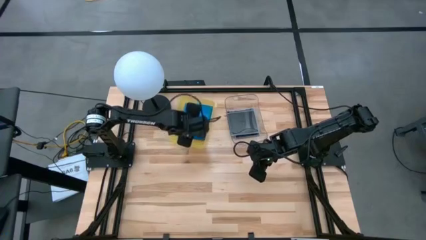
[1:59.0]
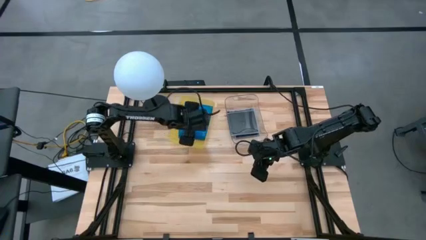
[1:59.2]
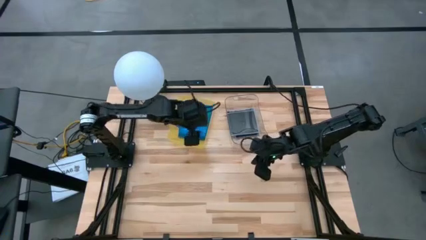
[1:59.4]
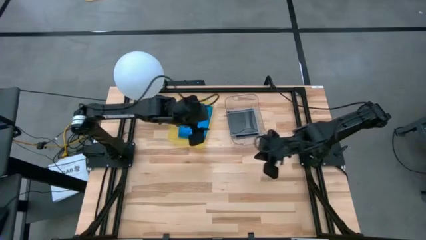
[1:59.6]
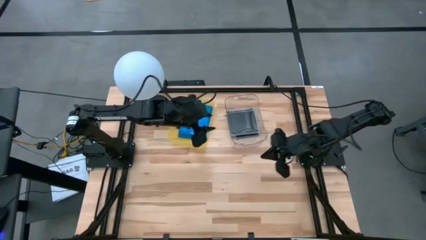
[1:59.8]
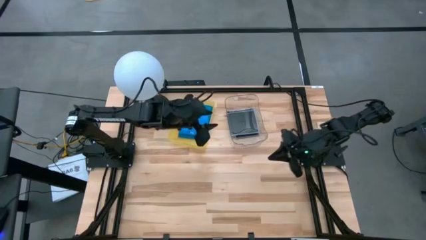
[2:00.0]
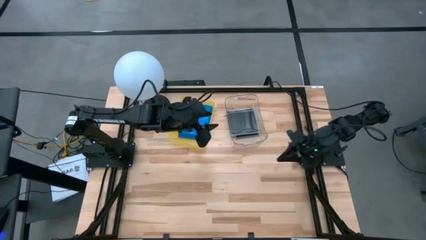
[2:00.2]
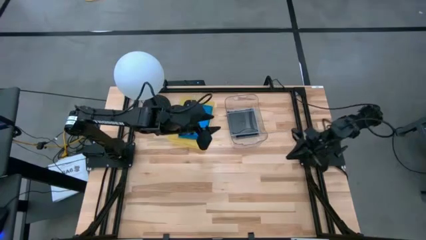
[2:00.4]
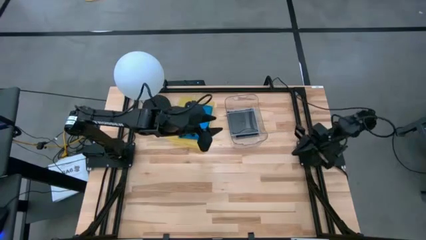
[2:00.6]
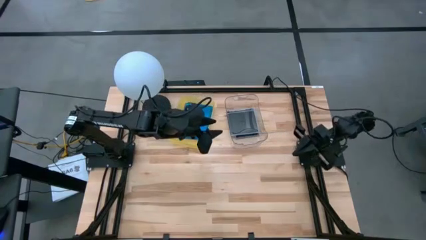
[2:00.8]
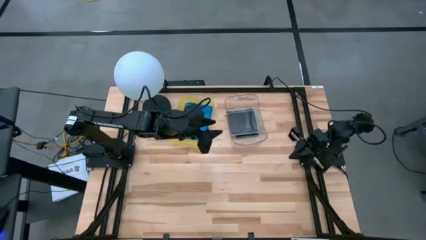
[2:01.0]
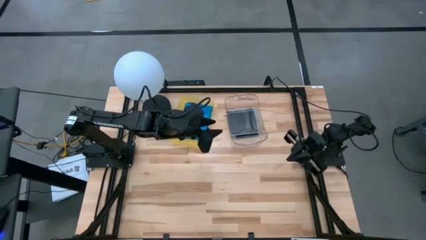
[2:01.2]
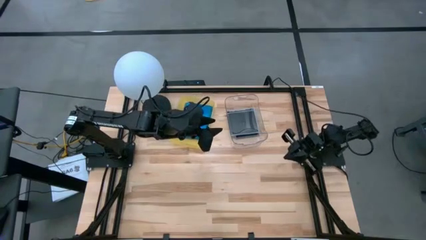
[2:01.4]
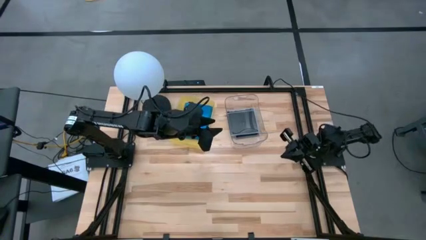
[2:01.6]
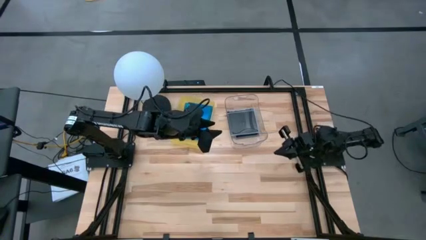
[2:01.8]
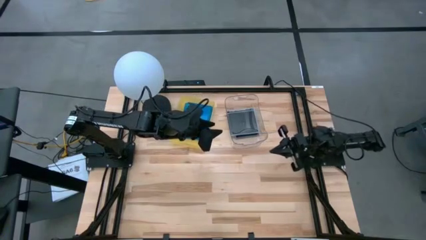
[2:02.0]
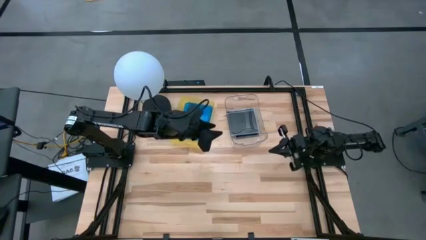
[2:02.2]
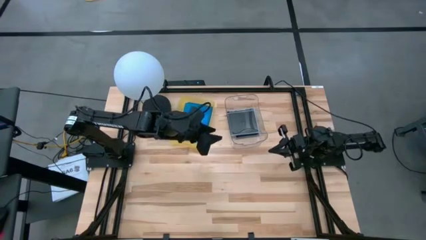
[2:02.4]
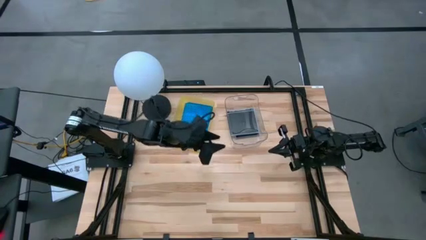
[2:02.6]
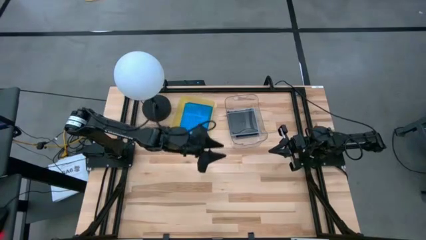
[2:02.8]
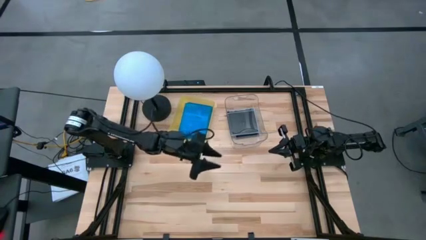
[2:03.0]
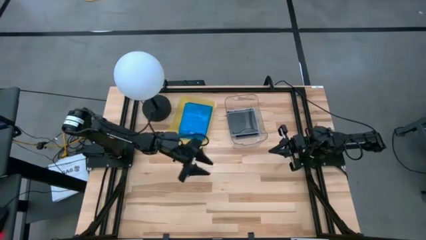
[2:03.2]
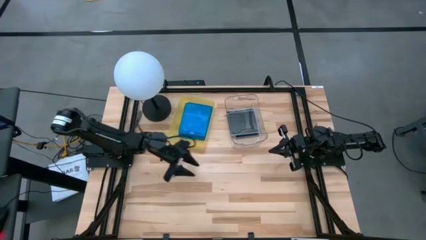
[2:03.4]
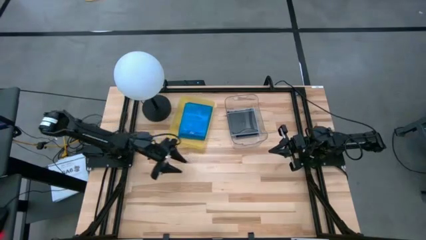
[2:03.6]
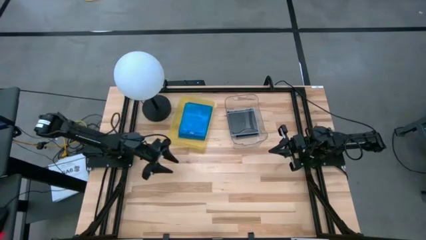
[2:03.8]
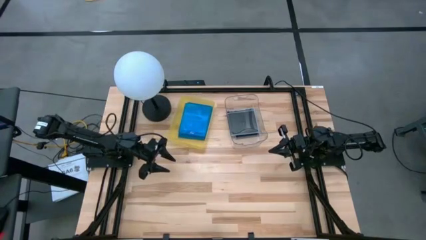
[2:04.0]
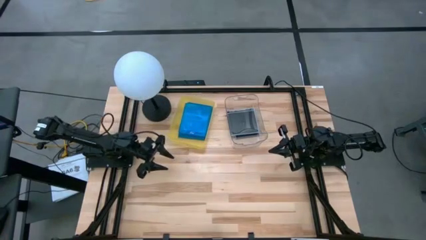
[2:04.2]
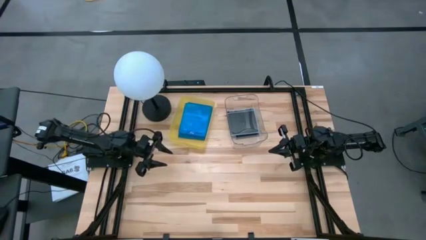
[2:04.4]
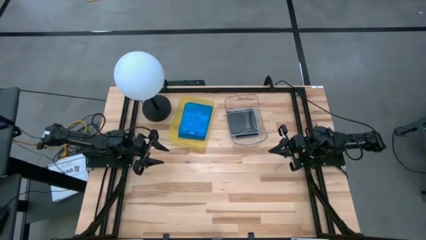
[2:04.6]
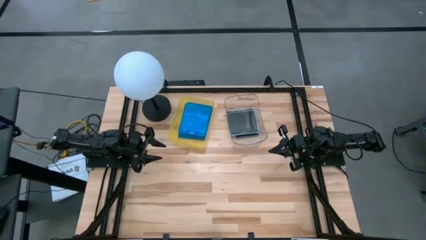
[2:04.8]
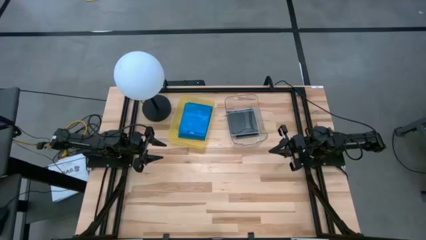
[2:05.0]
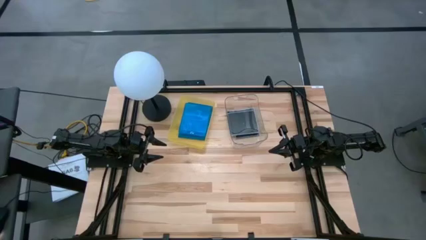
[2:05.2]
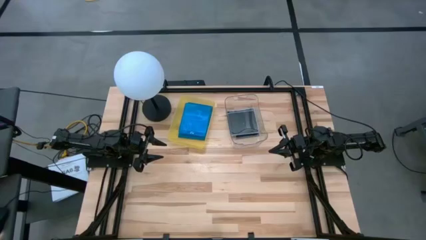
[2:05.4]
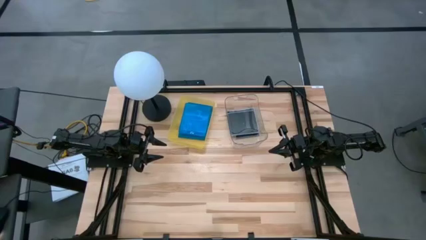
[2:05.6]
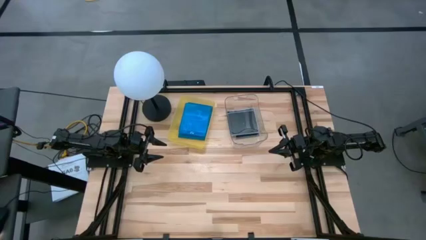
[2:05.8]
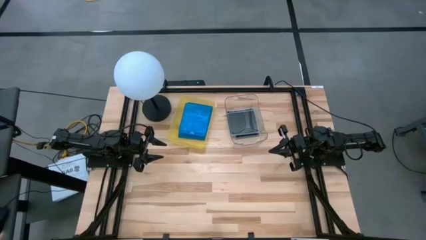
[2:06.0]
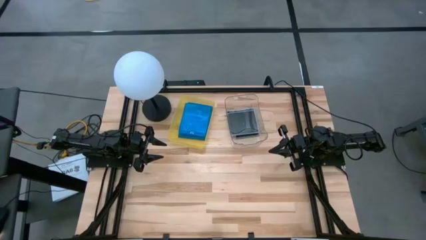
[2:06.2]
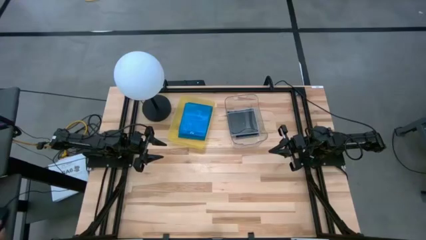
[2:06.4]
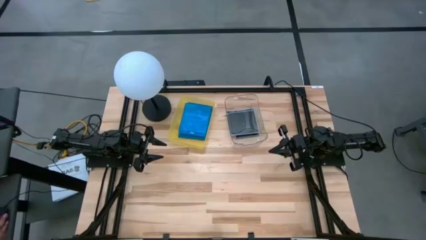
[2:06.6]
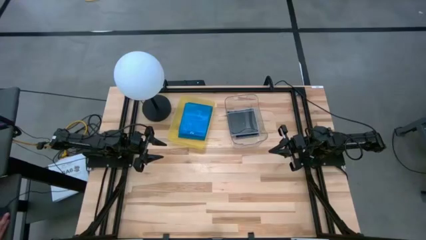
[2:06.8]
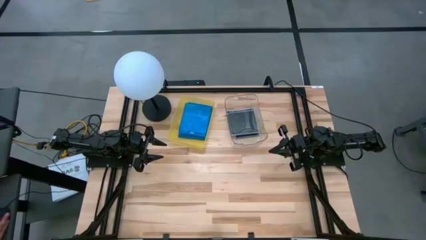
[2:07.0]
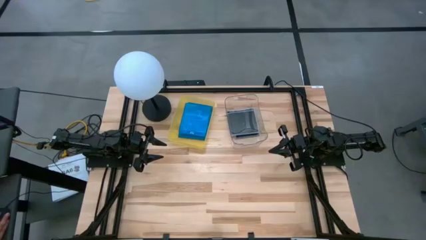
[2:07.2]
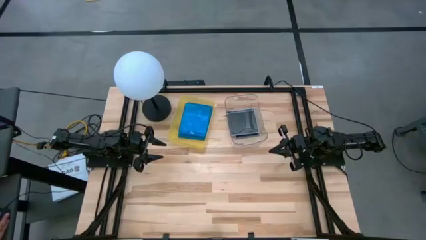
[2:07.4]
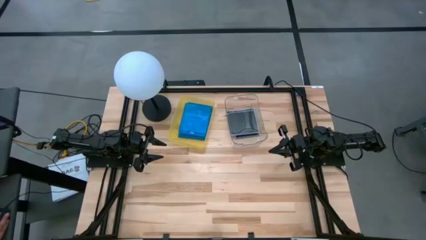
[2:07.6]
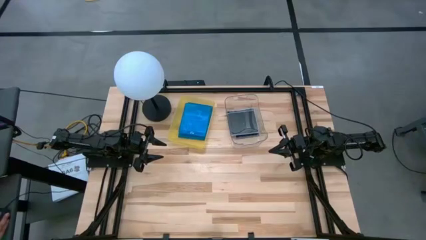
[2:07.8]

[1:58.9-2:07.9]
Task: Pick & place jewel cases by type
Return to Home Position

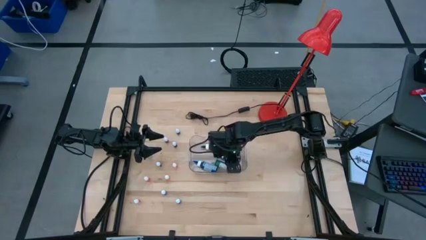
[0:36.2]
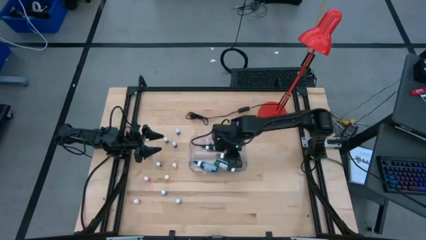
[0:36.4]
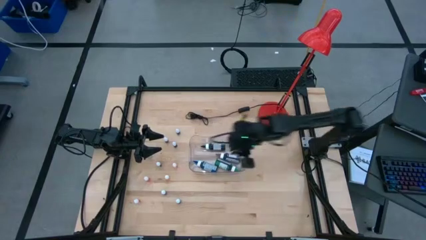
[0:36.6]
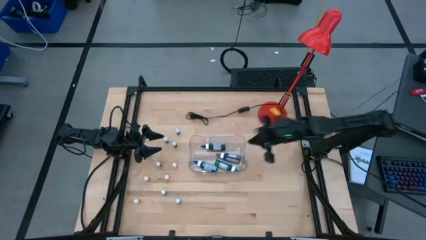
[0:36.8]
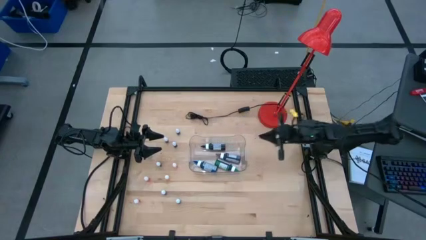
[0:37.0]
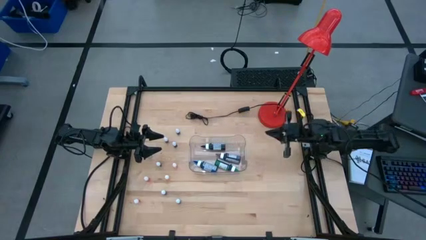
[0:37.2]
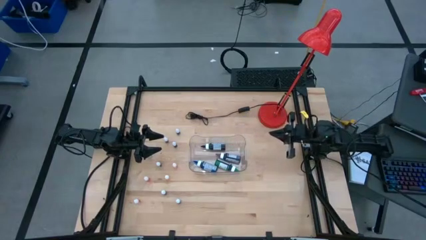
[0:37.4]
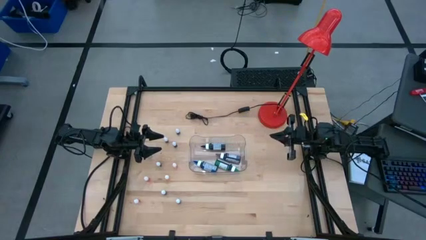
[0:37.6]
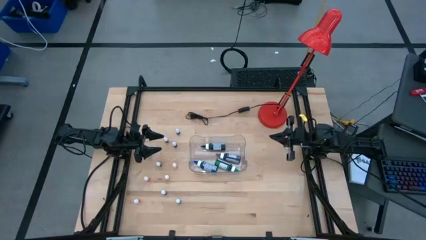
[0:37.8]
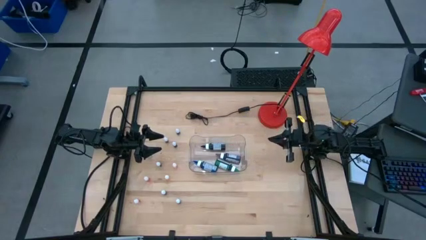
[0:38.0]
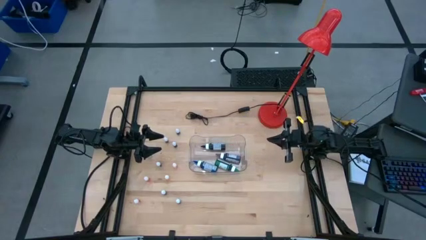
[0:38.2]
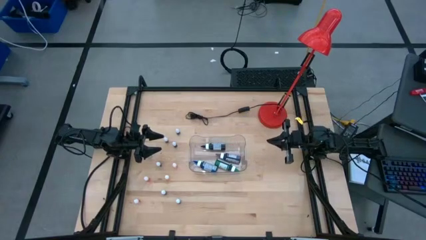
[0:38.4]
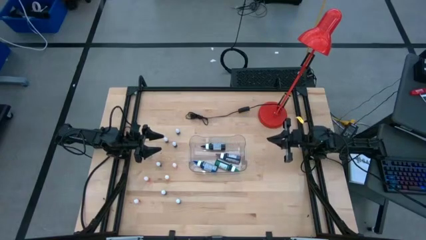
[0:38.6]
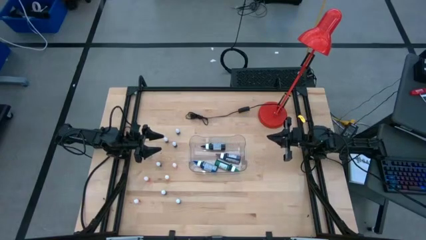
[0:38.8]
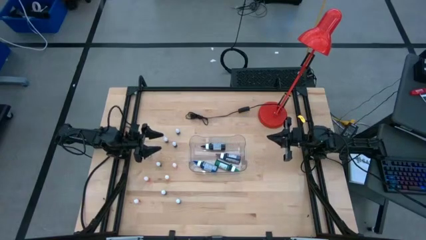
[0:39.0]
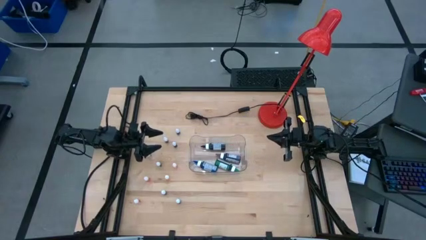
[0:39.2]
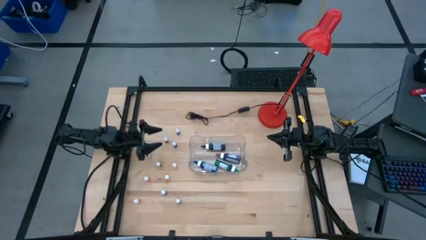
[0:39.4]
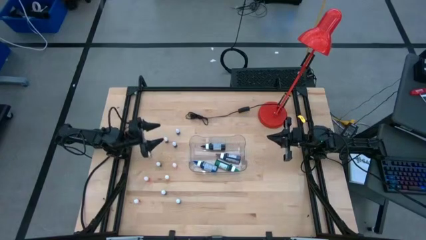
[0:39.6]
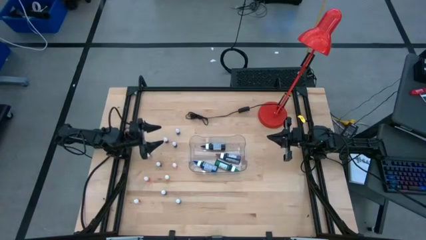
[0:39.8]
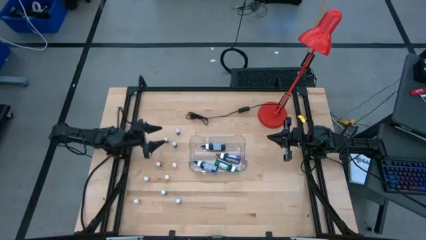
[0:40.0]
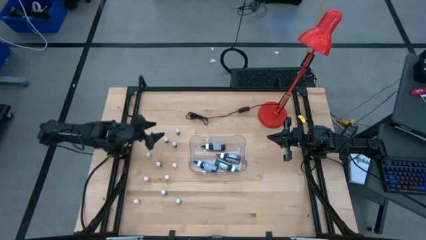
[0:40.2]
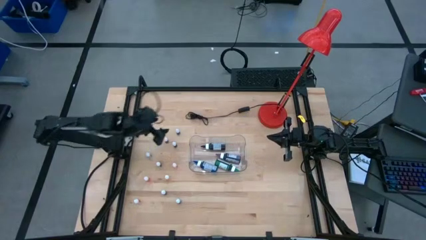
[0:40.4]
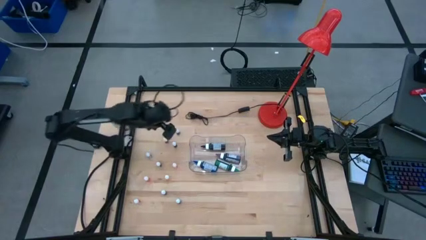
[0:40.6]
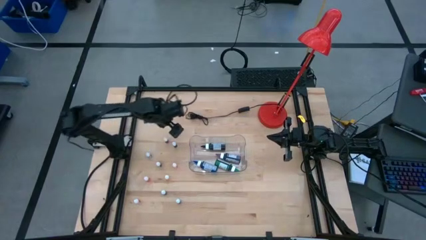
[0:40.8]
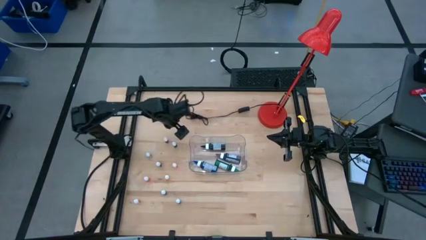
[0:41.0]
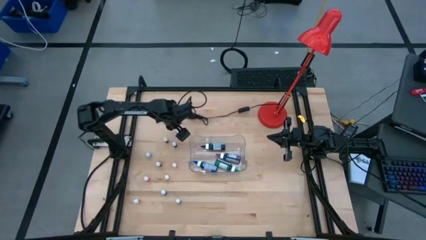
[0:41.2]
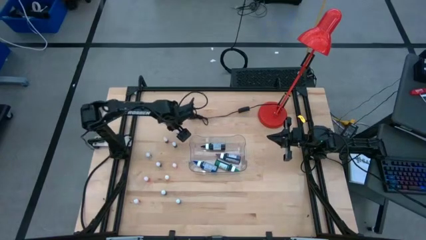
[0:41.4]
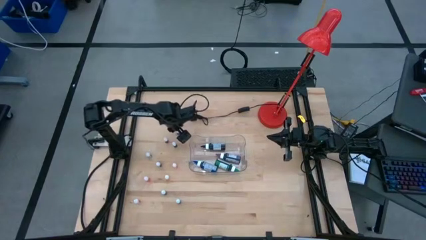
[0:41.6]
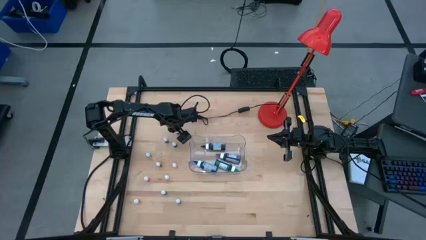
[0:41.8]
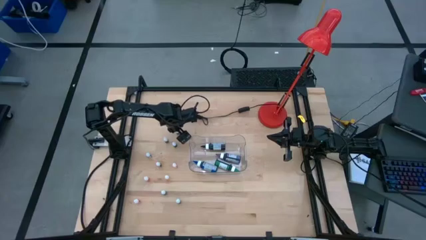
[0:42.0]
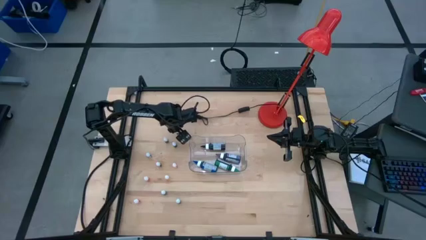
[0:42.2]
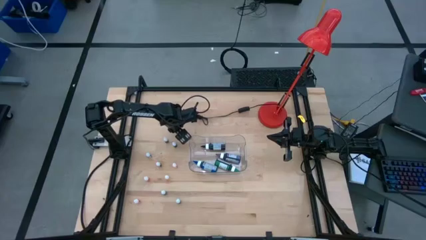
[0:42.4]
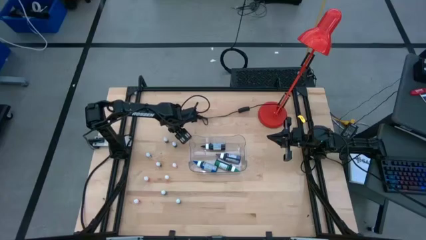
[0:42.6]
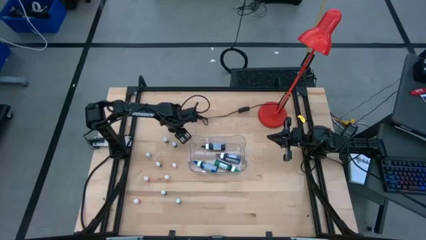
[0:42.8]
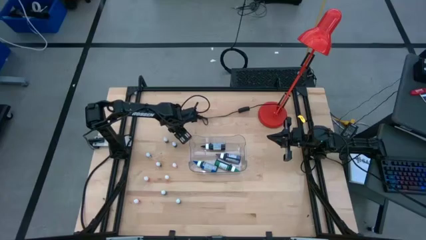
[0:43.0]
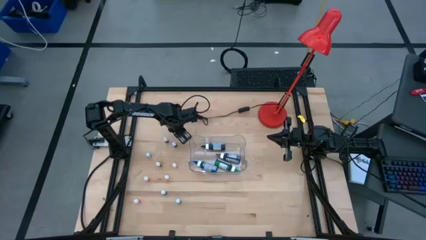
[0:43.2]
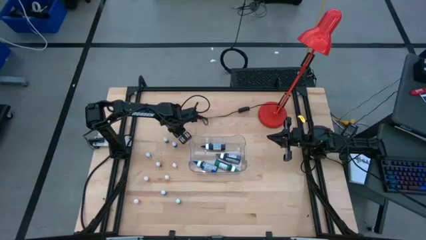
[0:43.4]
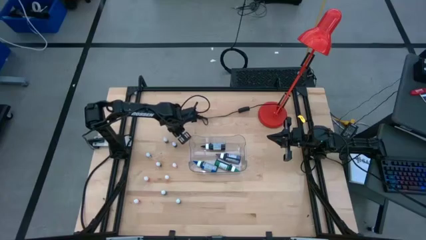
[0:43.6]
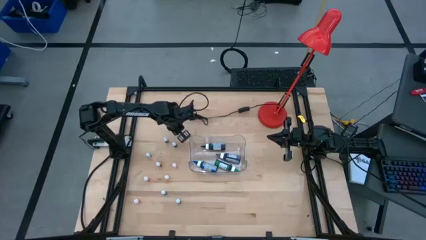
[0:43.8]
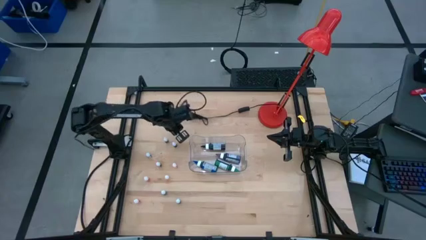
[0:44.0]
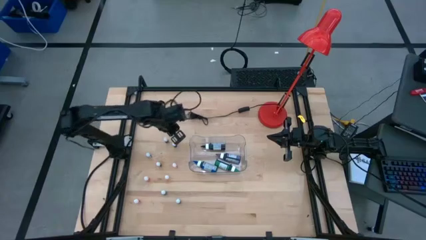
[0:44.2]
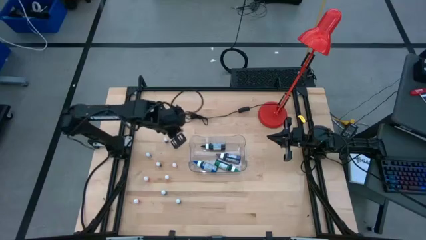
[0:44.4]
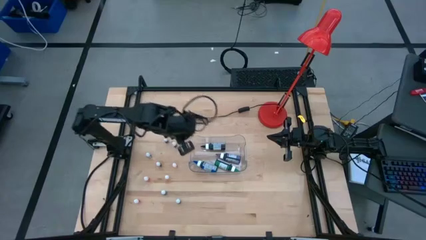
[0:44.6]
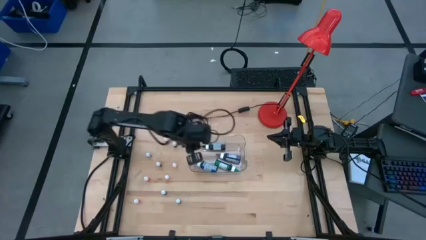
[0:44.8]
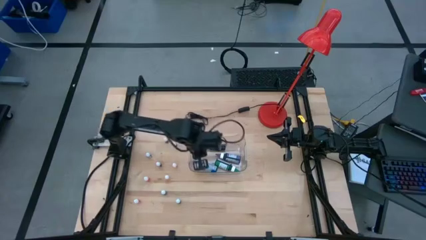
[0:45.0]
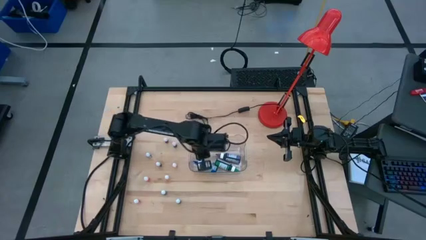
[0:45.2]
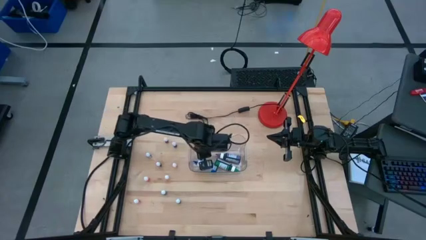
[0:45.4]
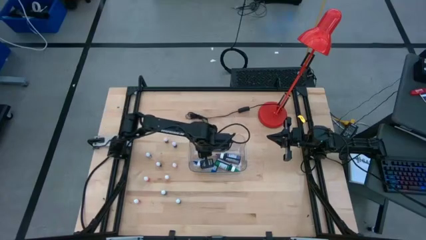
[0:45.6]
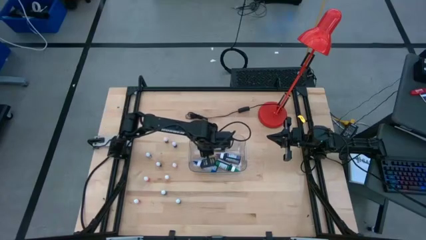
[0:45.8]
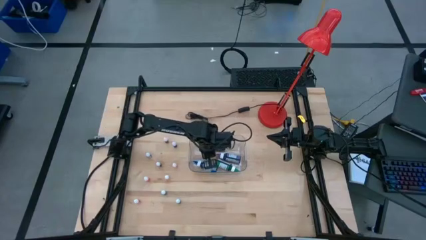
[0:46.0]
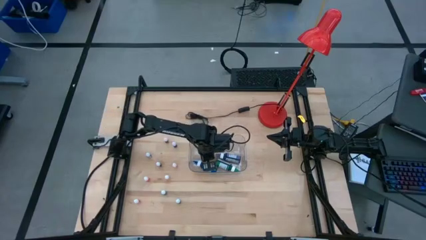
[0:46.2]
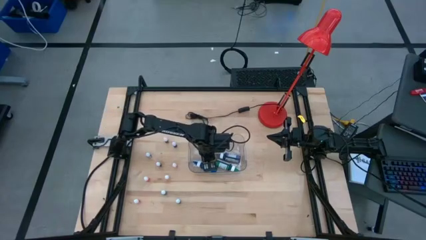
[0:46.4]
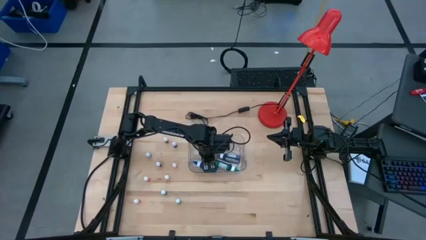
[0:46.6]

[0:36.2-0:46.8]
Task: Pick & Place food coloring
Put the small black food coloring bottle into the transparent bin
